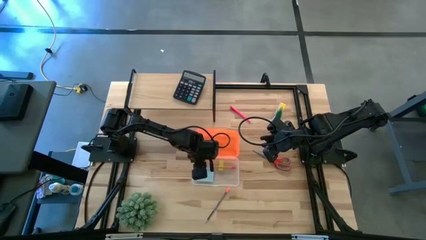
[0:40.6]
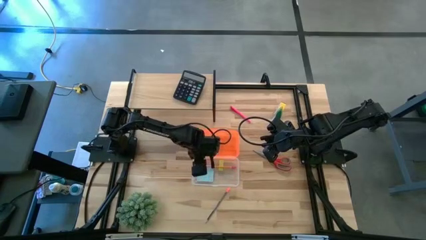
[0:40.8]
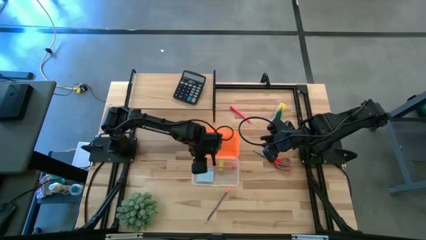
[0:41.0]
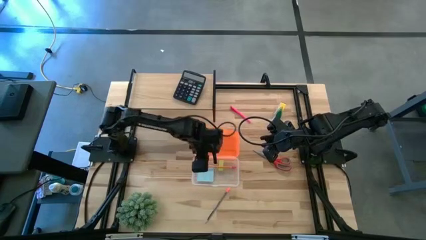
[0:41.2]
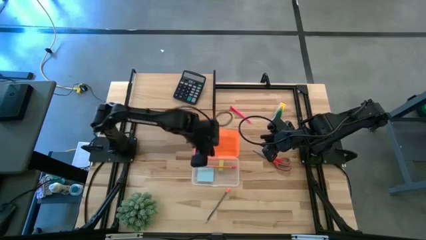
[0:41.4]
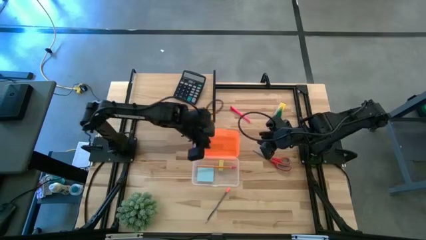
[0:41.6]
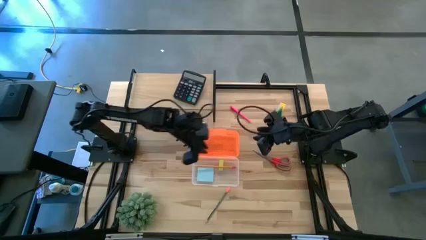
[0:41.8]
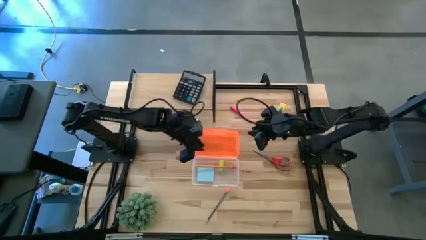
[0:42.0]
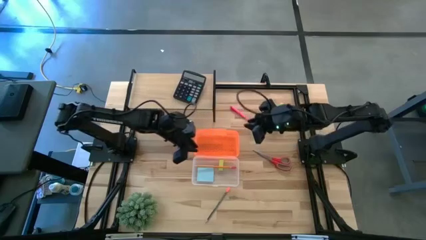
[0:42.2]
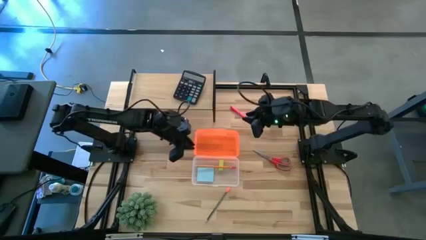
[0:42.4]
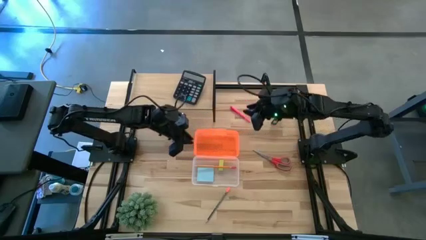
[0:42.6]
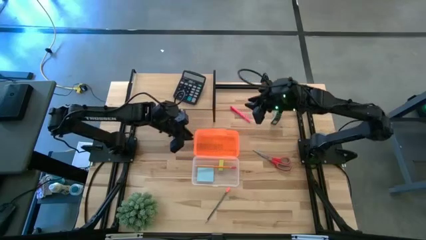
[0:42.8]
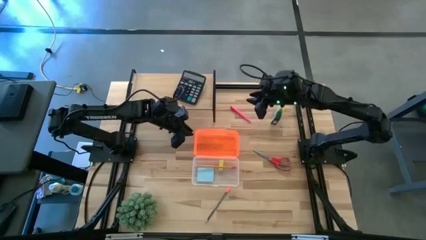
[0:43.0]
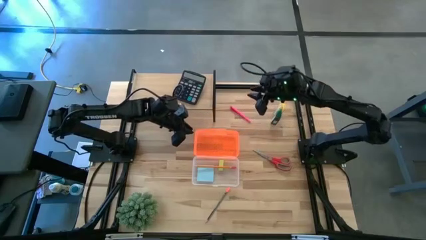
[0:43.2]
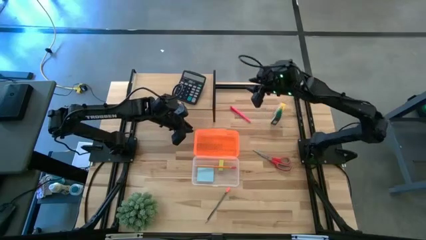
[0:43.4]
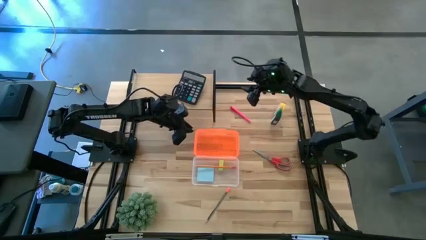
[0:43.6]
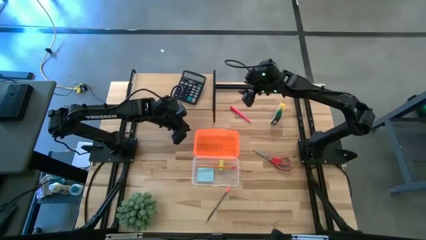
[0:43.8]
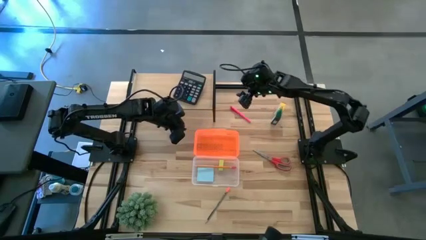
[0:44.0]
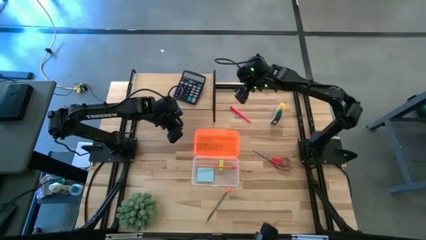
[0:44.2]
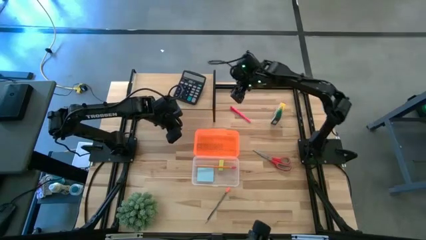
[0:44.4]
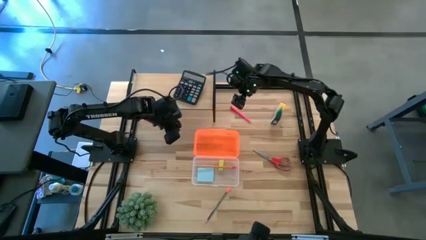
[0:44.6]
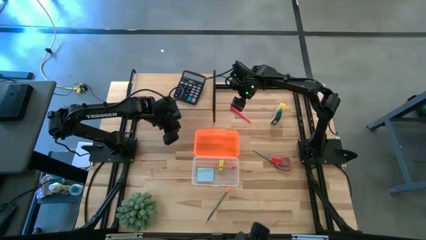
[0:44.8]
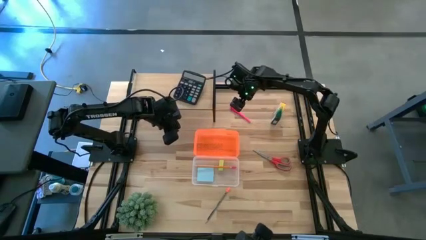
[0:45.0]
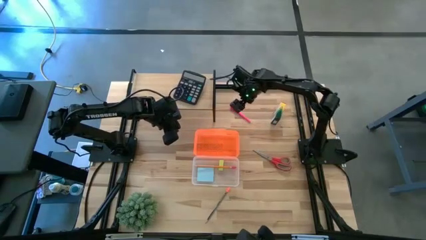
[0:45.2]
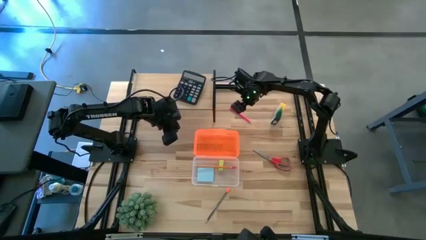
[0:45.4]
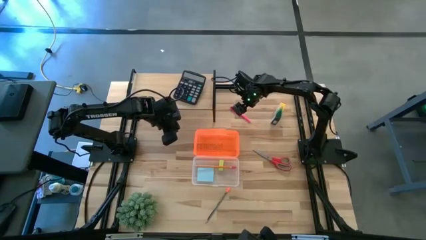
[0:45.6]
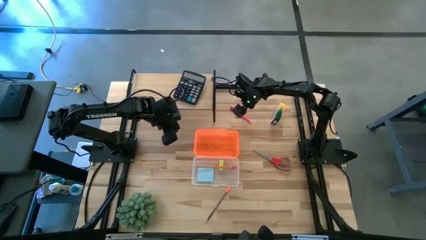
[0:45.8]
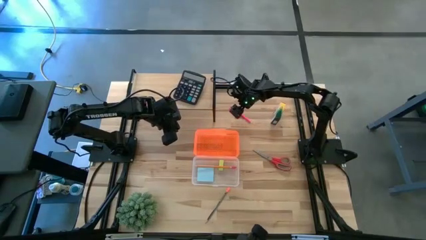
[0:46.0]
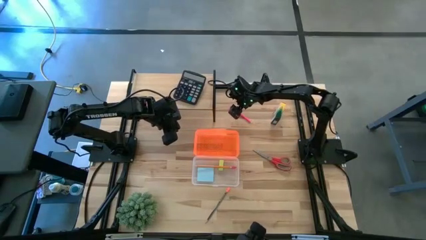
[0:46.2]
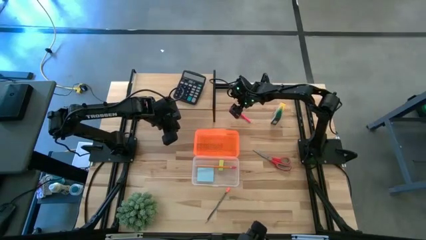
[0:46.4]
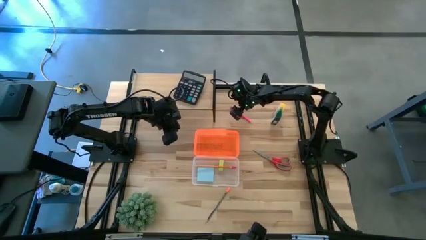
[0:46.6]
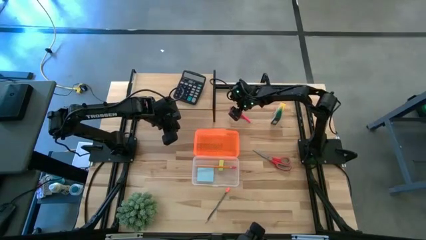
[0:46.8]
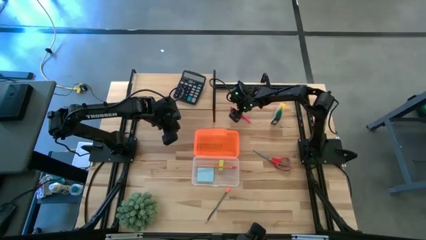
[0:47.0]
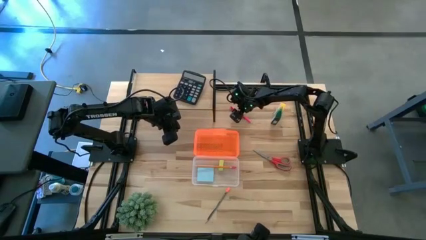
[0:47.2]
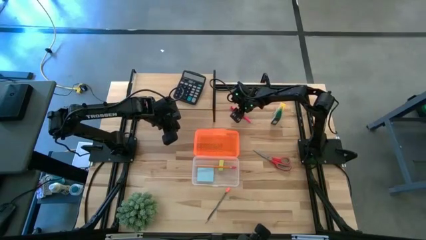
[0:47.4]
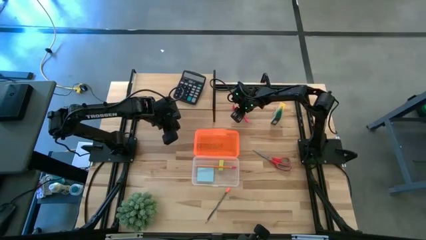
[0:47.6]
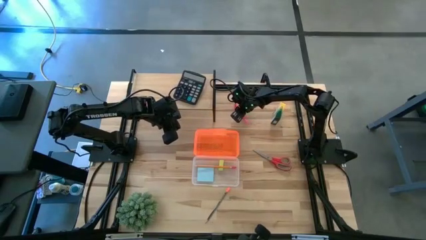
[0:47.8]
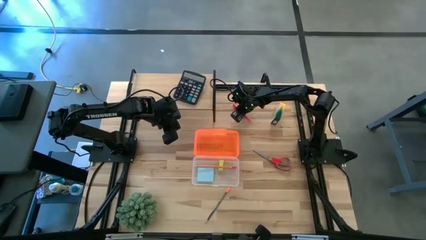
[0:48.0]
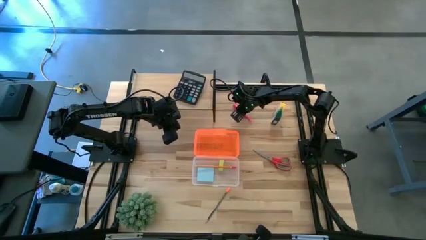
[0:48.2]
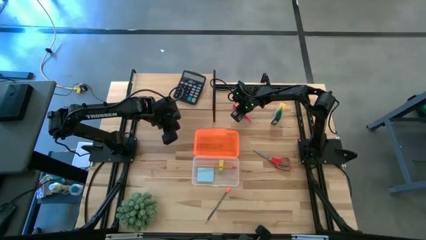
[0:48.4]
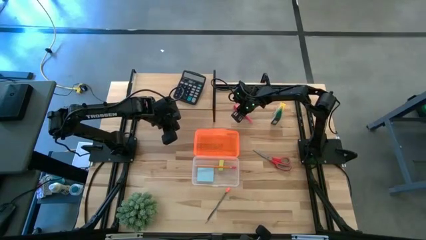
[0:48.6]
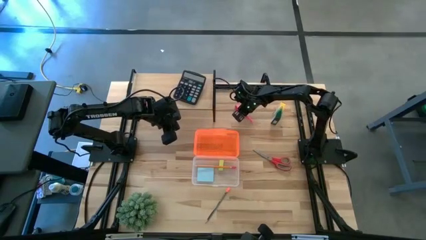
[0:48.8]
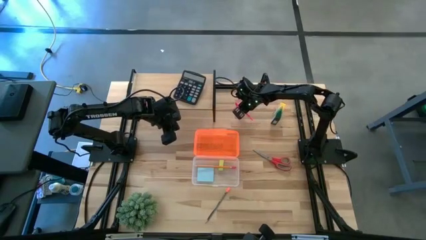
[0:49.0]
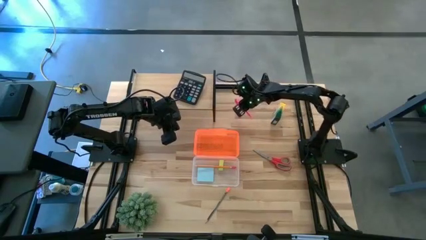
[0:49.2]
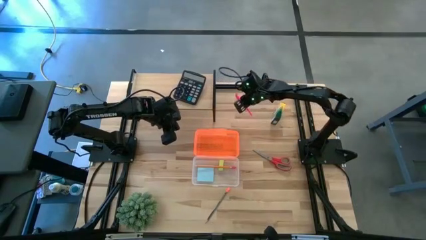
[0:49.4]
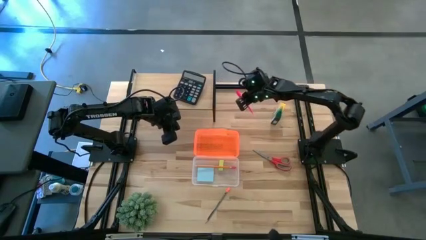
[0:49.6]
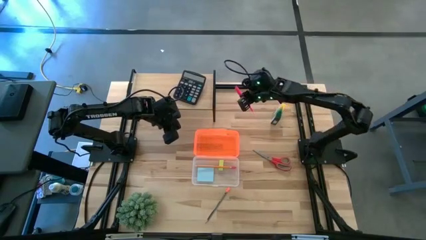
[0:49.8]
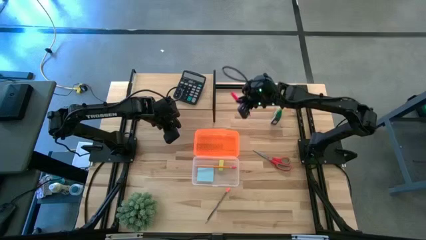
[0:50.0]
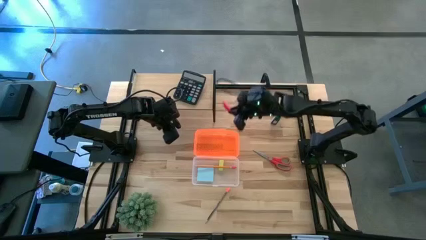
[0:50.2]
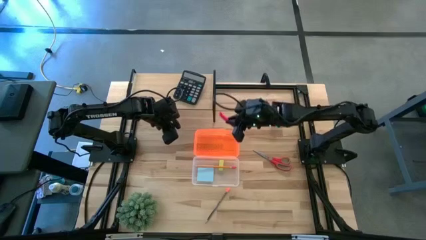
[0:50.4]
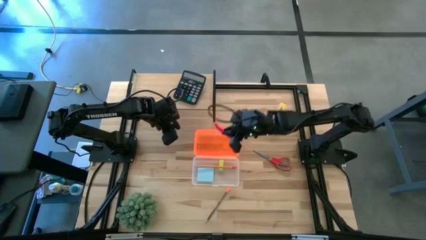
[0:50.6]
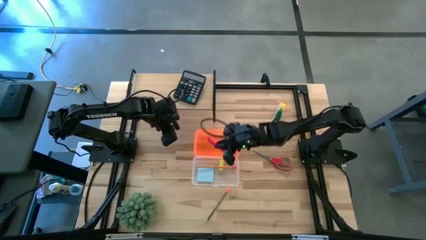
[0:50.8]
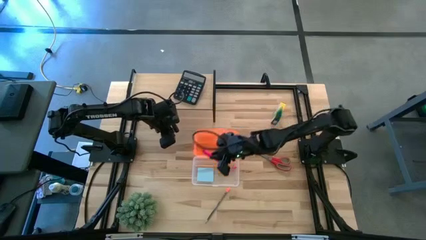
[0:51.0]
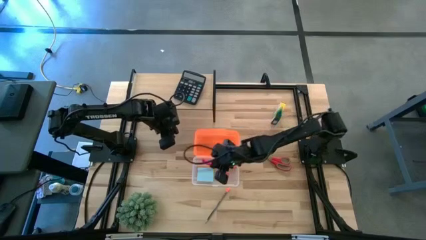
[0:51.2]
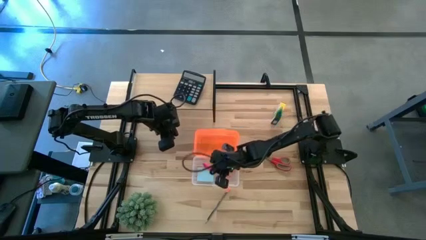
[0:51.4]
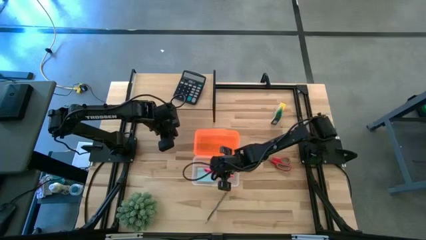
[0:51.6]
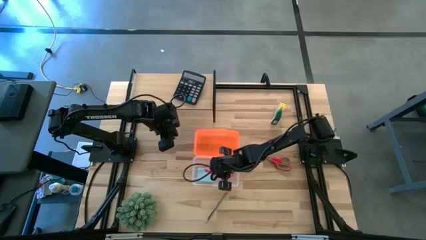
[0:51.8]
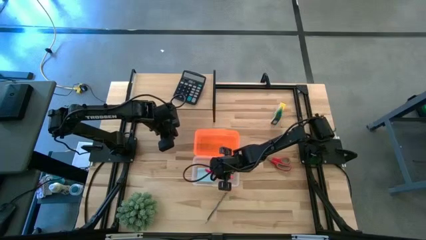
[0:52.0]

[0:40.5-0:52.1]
Task: Pack school essentials
Put the pink pen into the school supply box

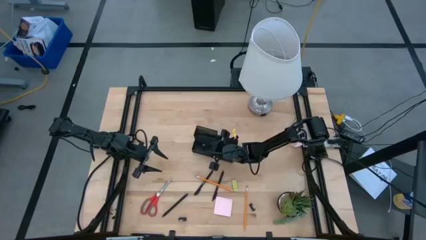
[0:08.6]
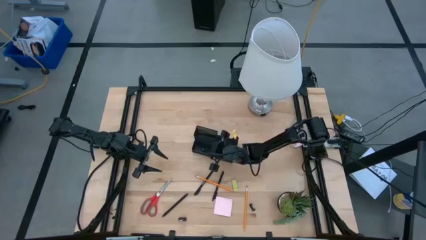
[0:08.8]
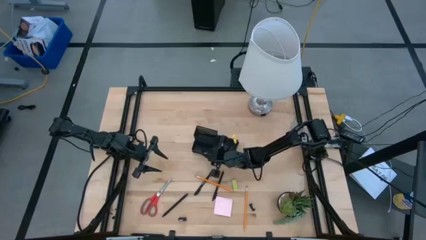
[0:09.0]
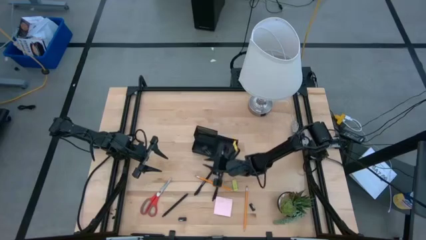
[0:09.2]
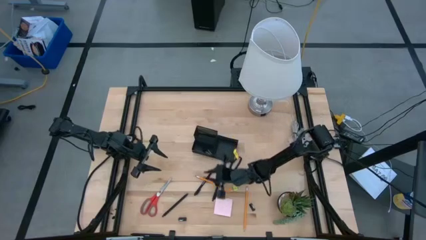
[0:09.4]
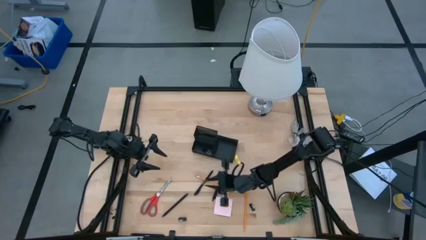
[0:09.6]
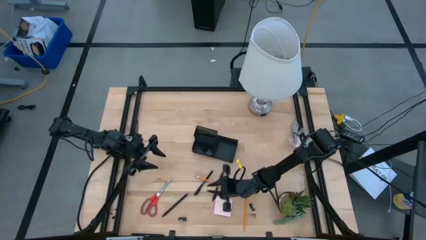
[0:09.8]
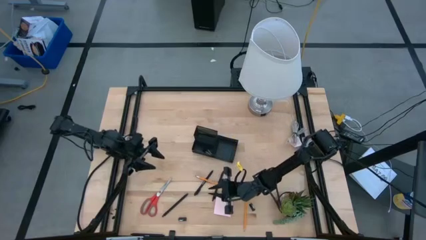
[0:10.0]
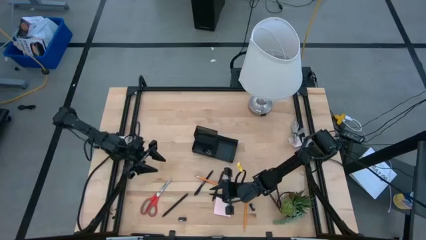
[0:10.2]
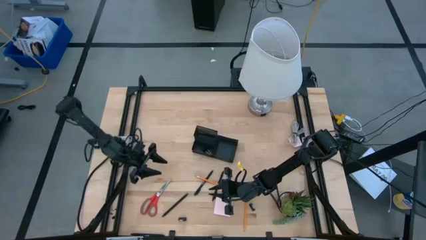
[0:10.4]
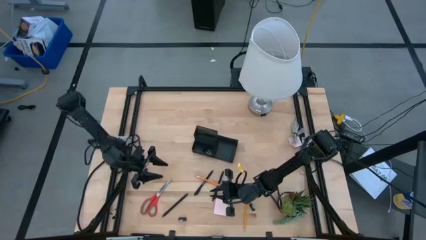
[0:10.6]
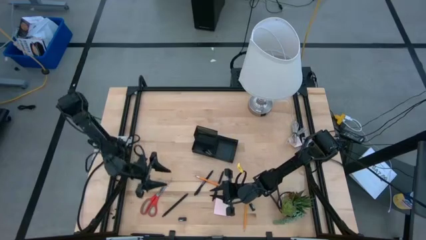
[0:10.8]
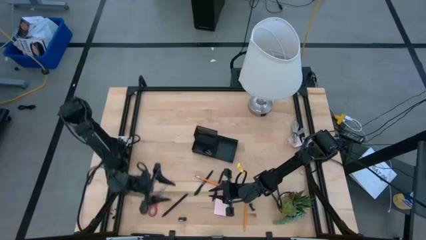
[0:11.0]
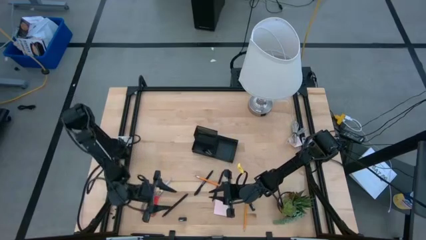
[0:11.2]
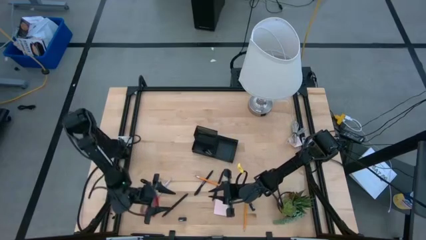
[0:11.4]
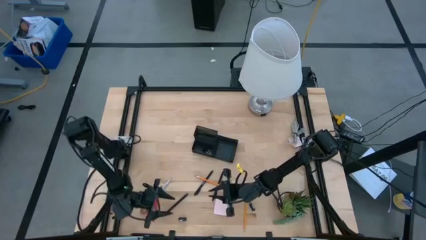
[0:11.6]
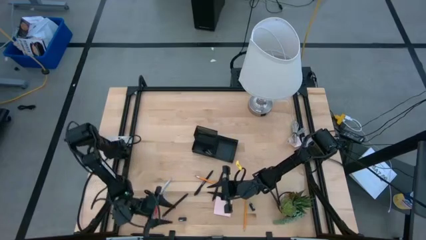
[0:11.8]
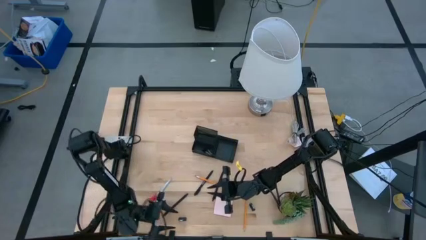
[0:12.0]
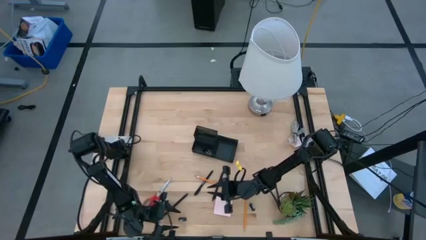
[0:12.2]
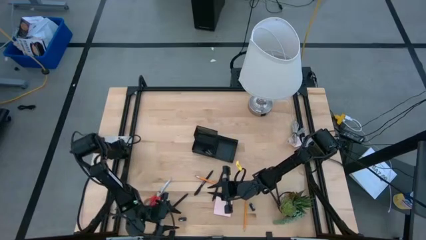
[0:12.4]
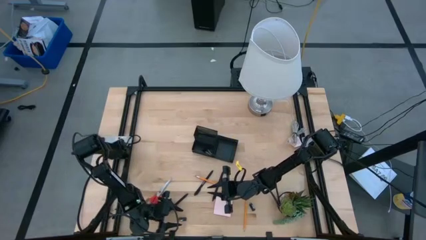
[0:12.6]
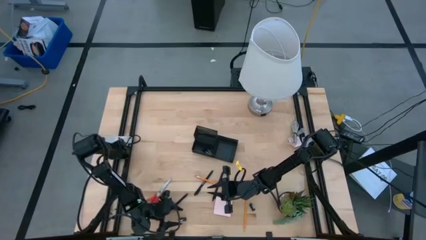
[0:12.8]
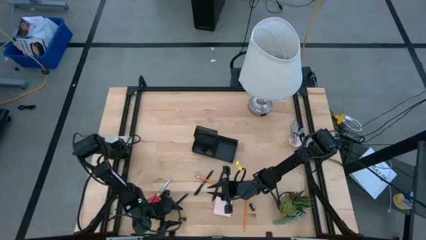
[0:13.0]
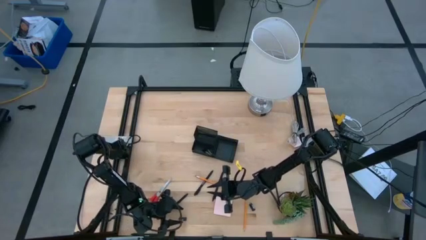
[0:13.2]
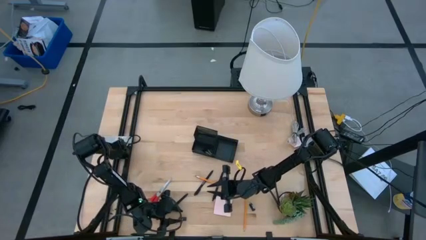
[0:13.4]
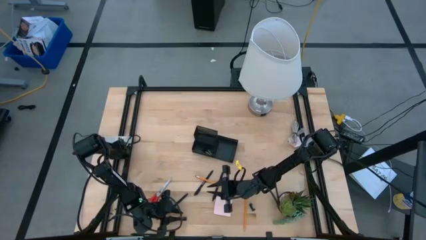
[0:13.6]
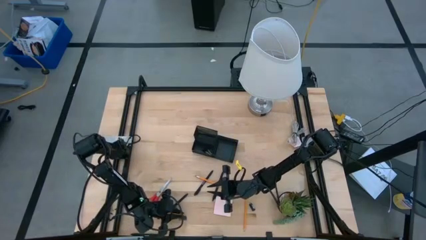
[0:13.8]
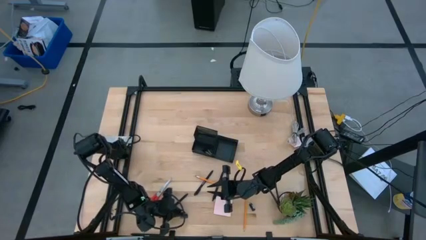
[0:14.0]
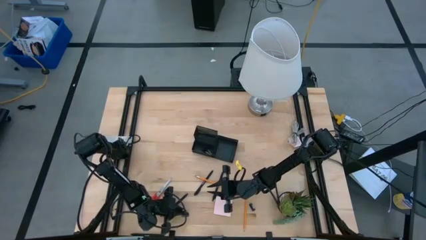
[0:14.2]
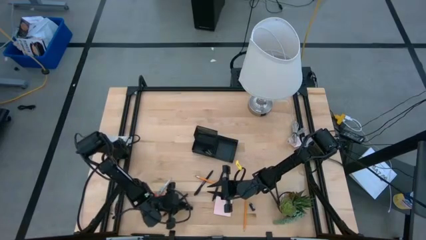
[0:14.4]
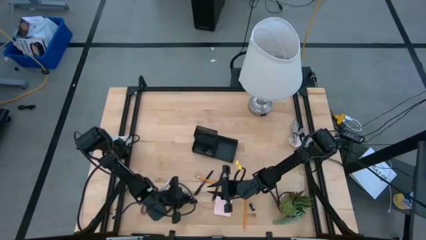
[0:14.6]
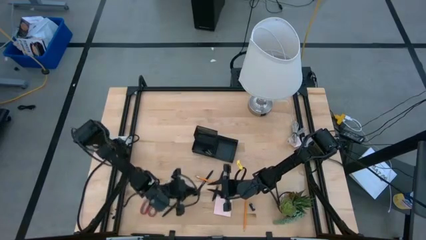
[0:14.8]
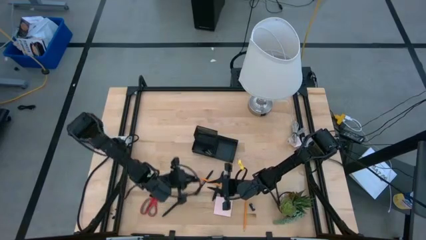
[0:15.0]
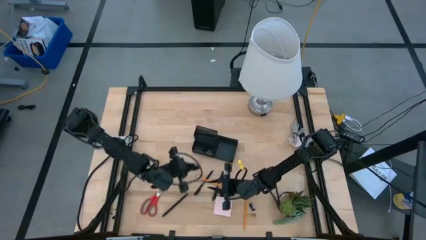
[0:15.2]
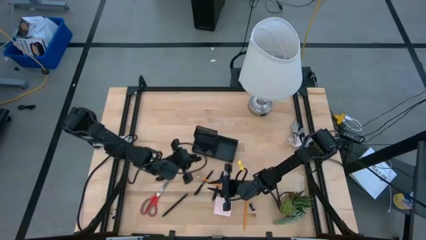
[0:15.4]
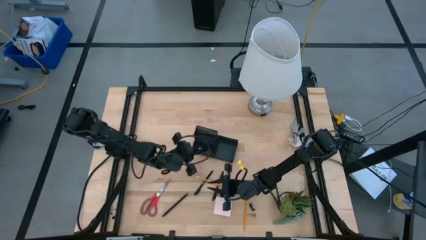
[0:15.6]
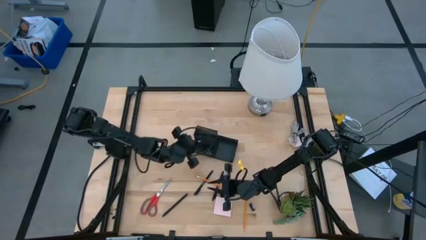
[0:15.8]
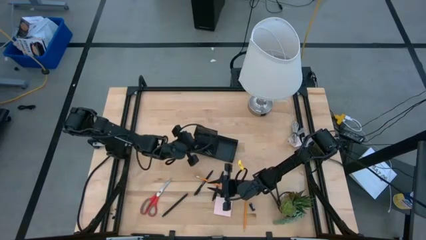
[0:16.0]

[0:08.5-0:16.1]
Task: Pick and place office supplies into organizer
Put the black binder clip into the black desk organizer
